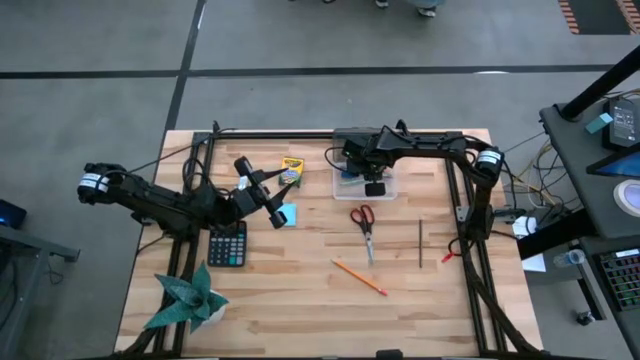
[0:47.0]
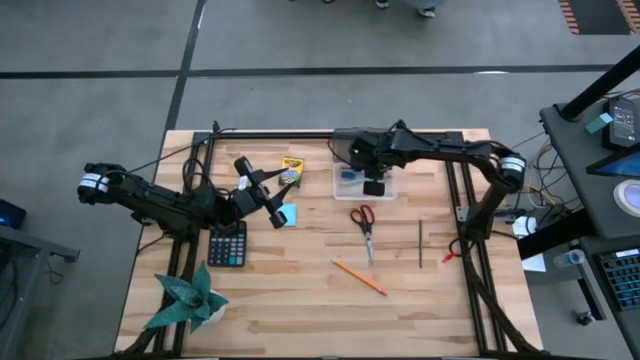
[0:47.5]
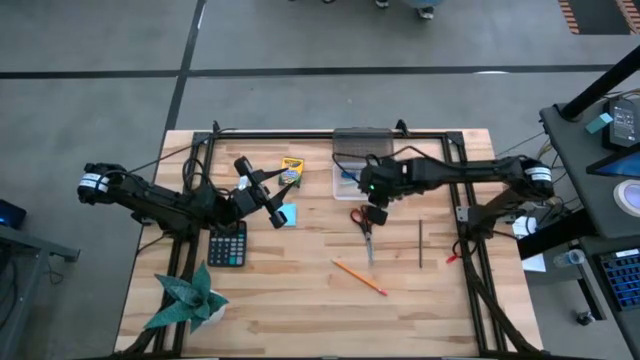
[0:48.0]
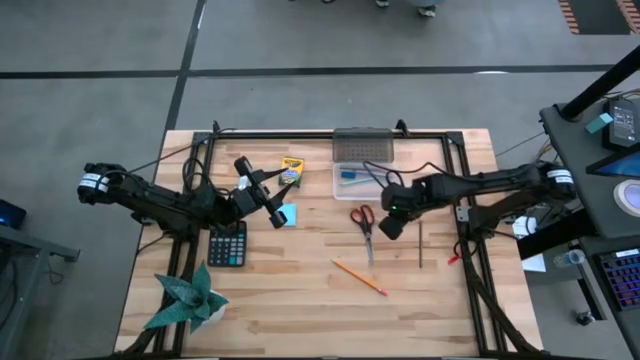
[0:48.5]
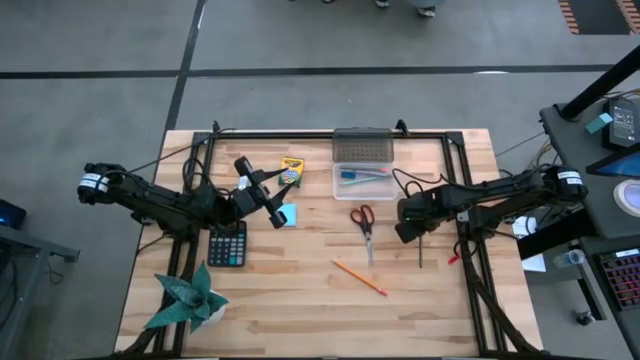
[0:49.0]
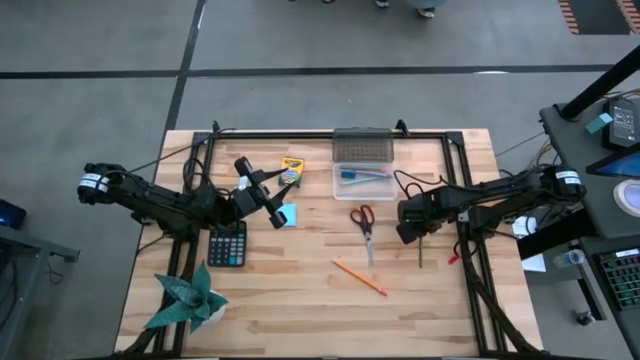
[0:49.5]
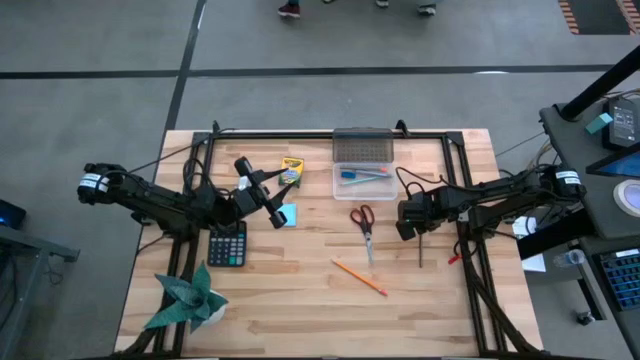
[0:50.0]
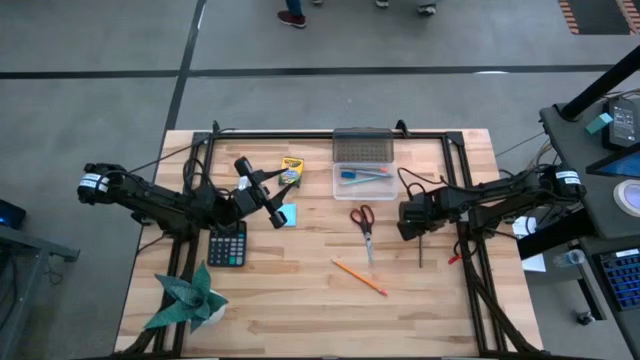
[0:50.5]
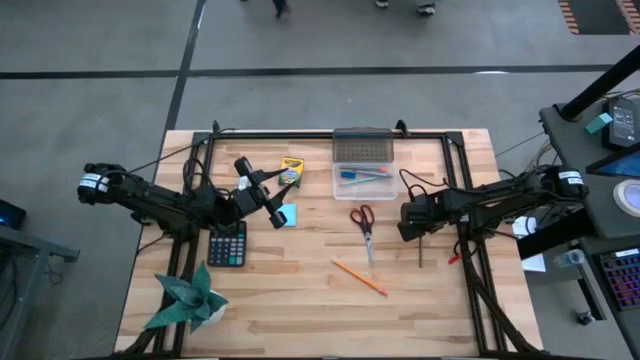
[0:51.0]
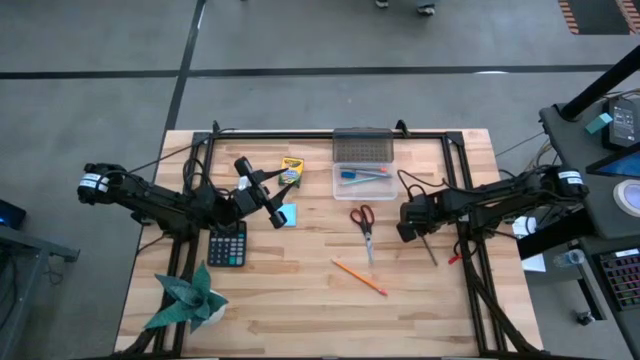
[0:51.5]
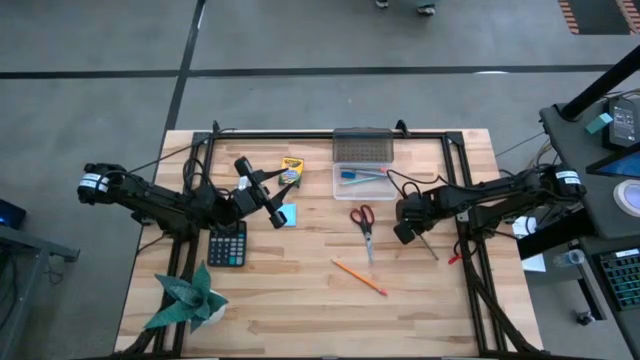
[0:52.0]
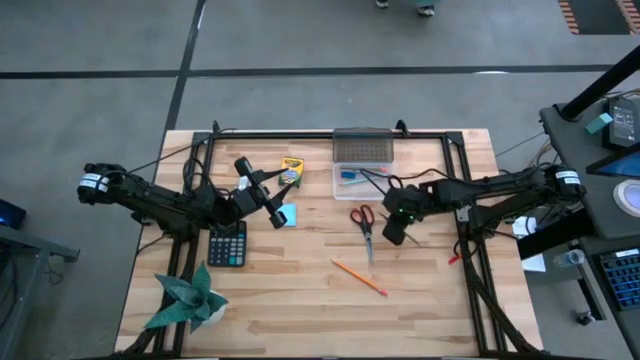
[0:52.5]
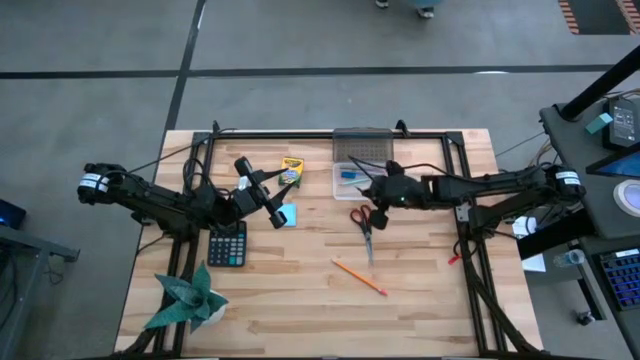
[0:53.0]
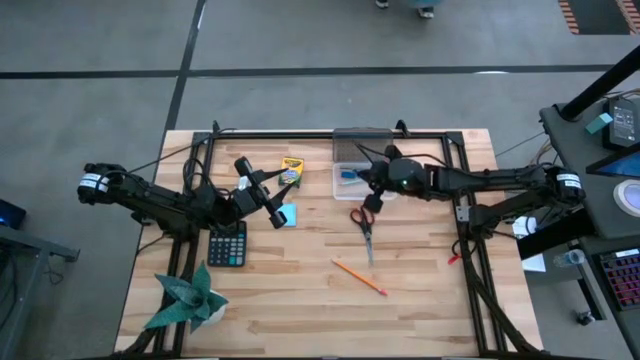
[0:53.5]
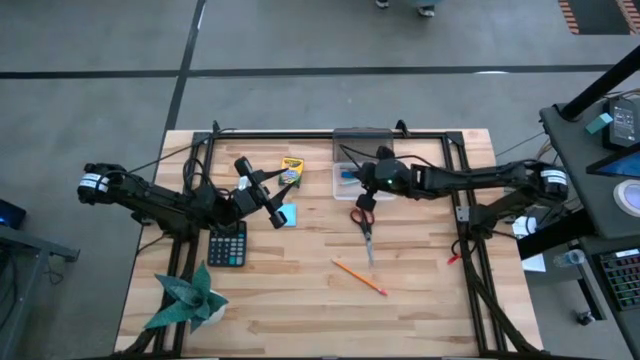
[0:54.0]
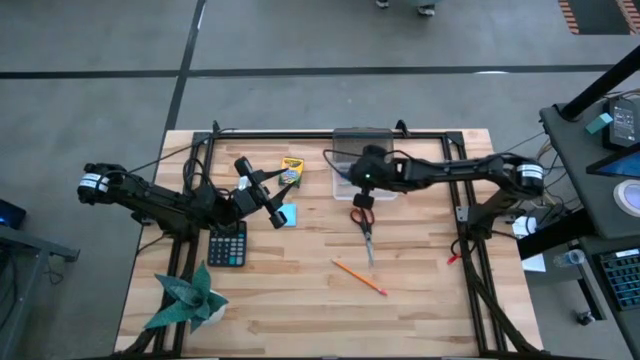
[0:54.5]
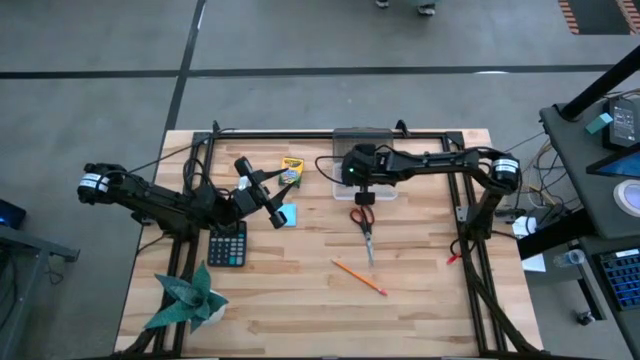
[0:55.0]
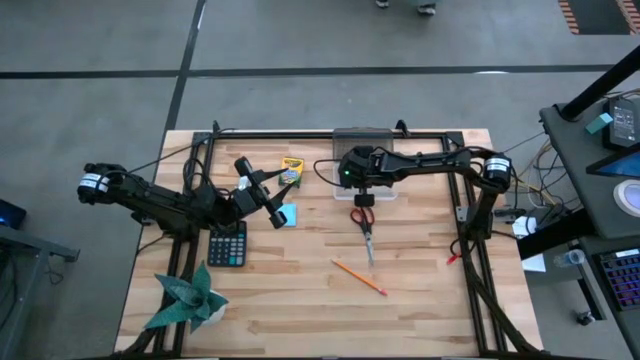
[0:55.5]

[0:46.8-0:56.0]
Task: Pack school essentials
Put the black pencil into the transparent supply box

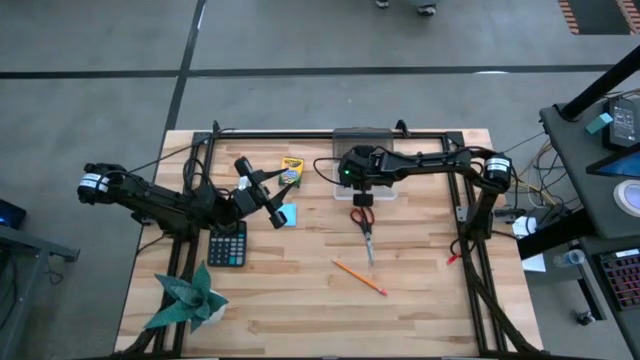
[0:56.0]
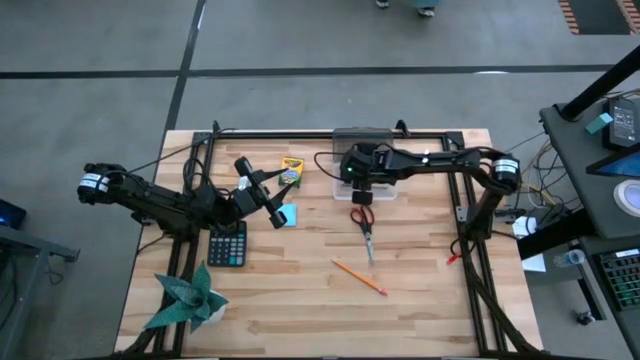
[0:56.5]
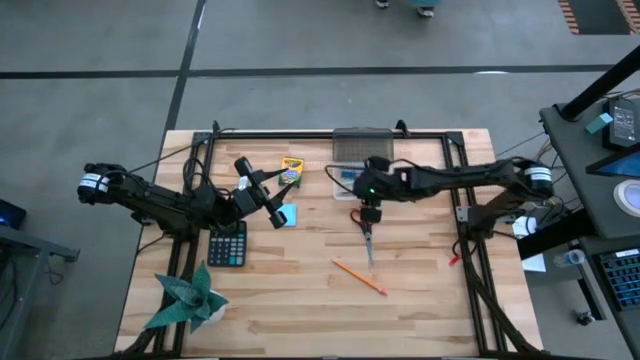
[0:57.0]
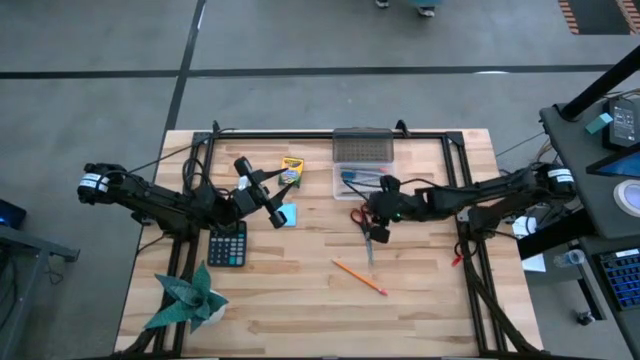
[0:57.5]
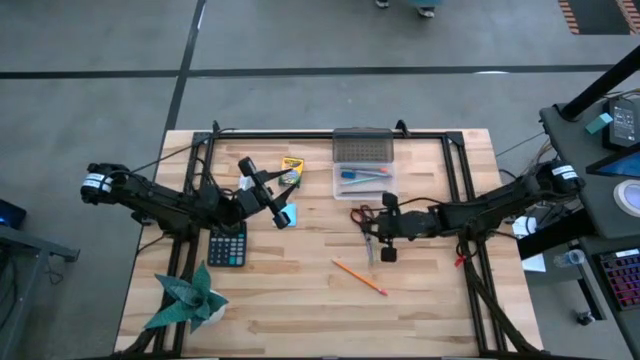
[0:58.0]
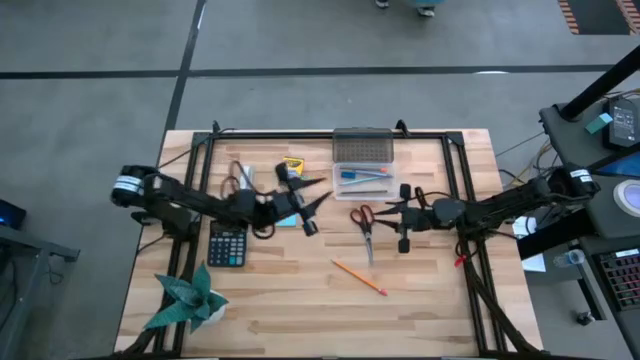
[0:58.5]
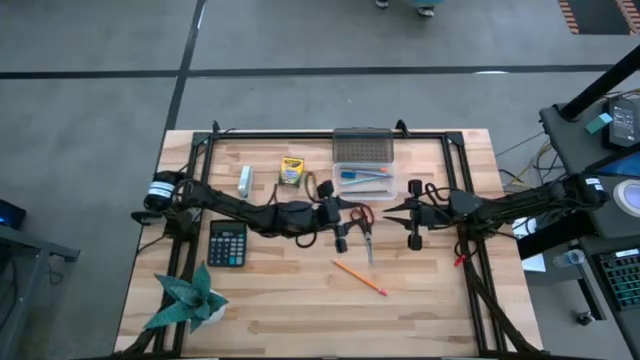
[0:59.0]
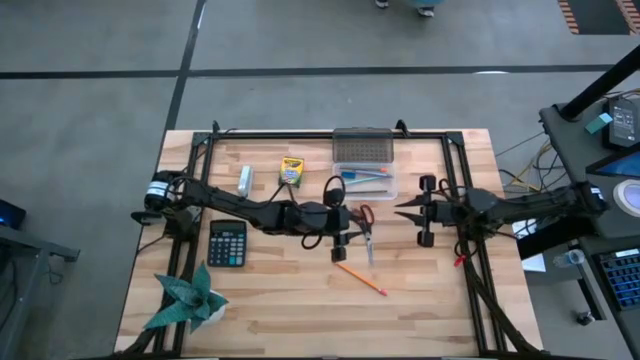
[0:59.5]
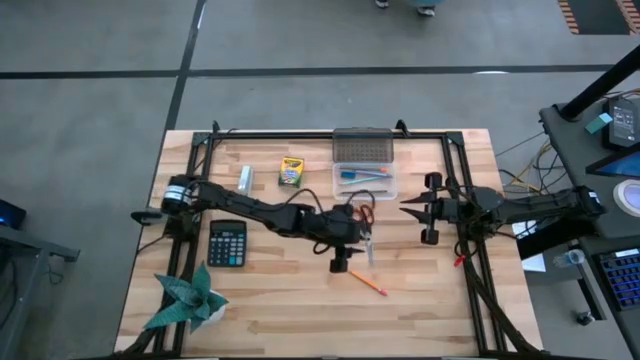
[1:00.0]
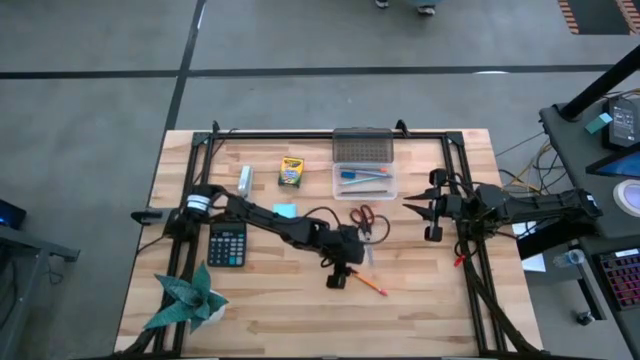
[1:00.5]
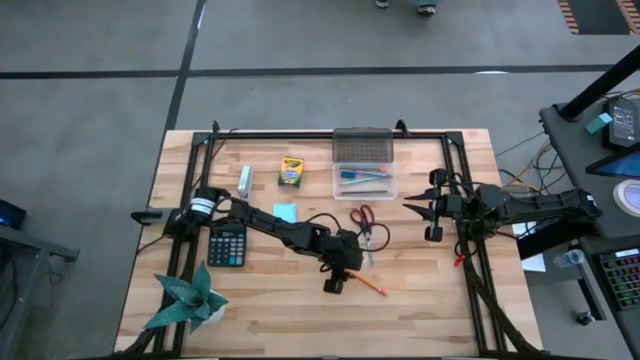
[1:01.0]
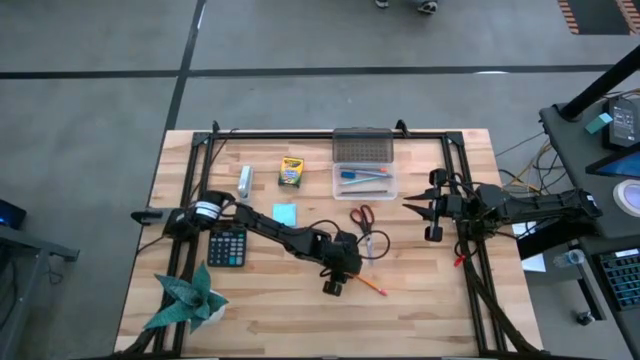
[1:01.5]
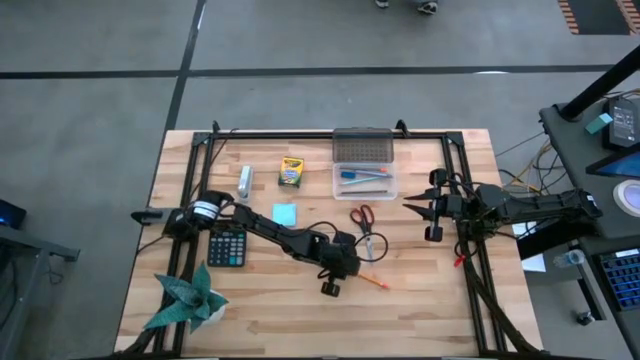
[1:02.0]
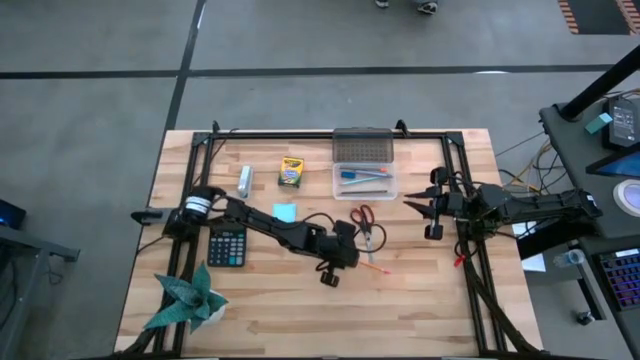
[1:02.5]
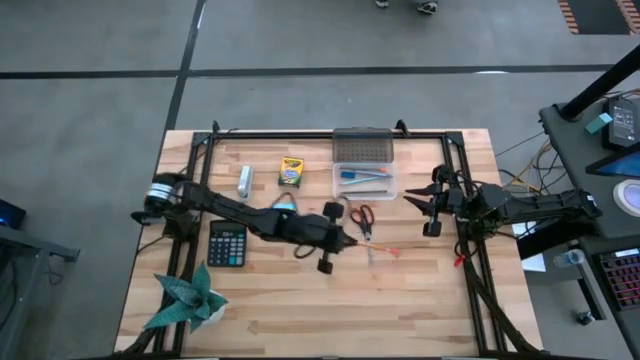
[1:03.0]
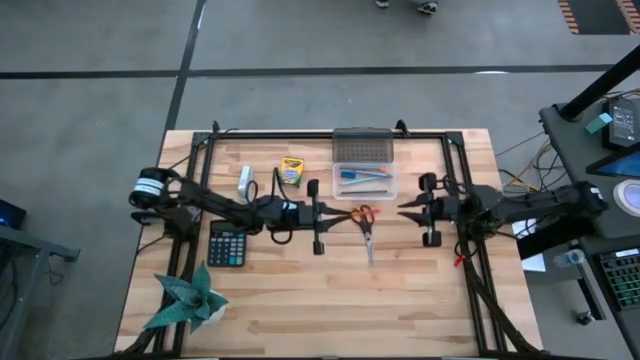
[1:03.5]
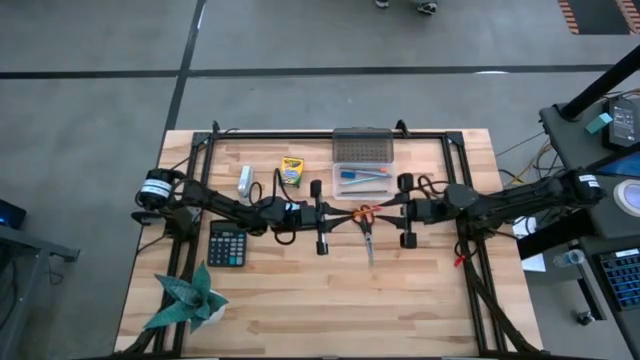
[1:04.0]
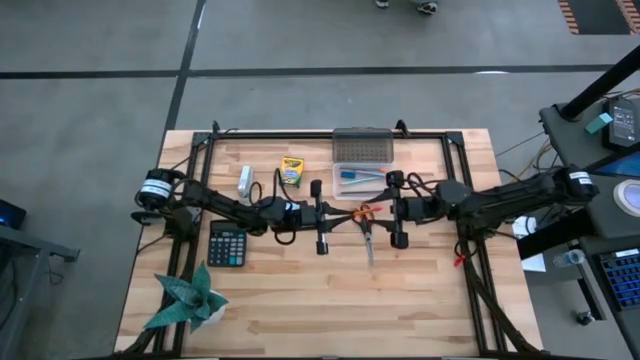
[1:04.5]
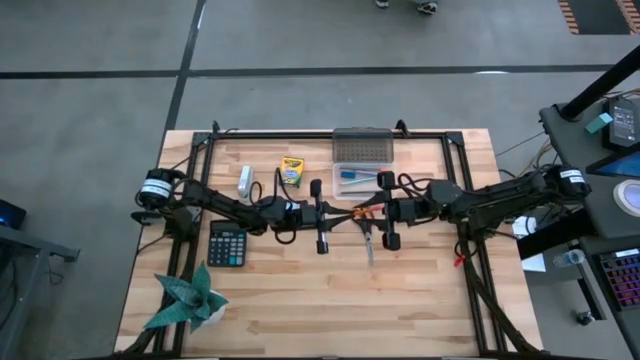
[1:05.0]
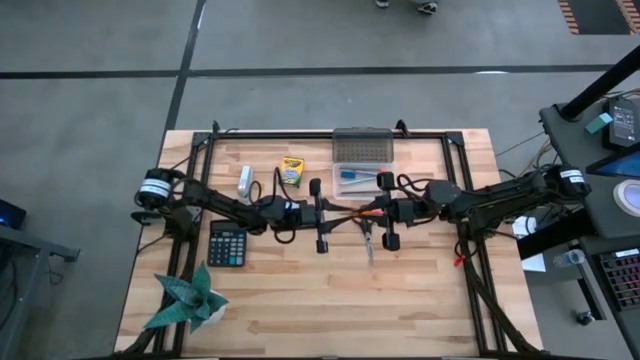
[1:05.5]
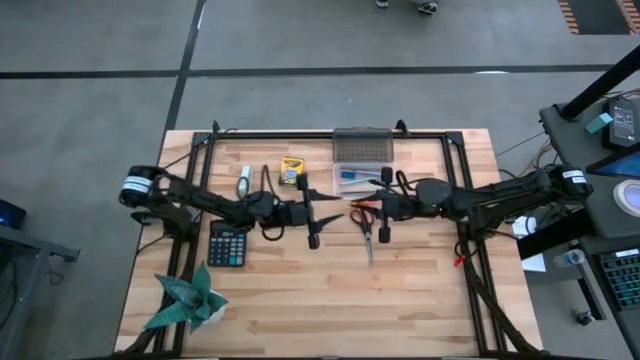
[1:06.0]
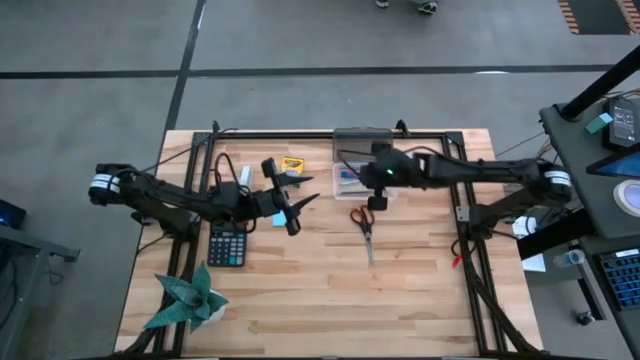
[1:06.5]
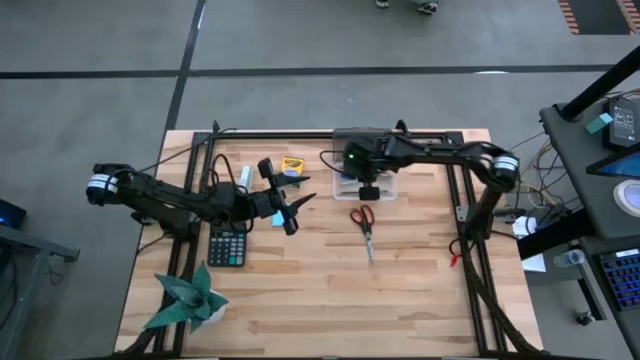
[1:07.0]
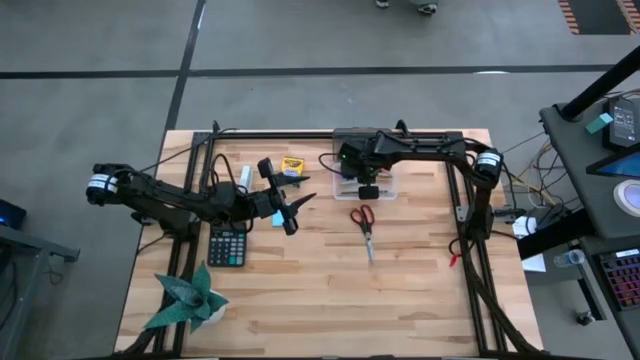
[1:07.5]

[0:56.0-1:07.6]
Put the orange pencil into the transparent supply box
